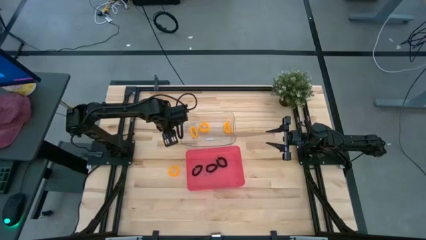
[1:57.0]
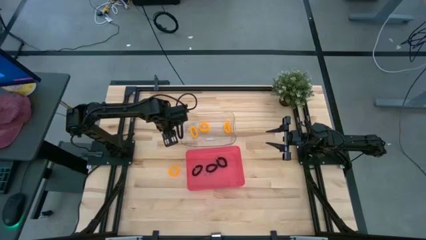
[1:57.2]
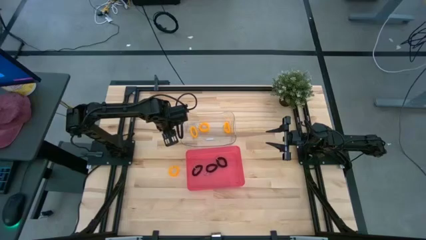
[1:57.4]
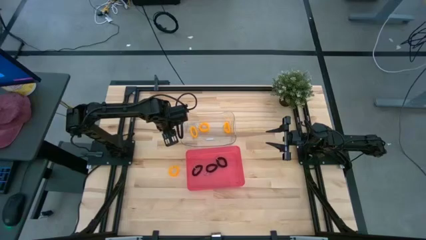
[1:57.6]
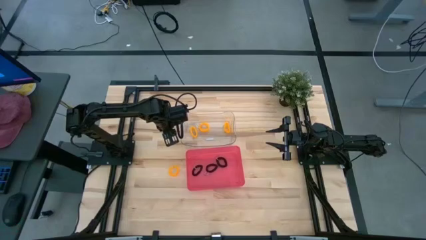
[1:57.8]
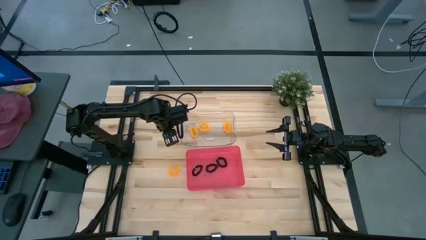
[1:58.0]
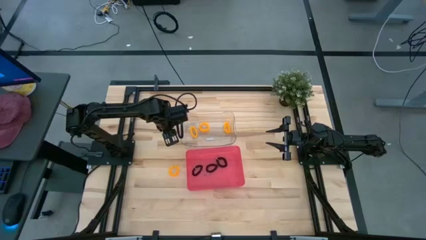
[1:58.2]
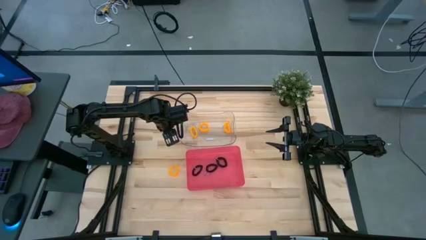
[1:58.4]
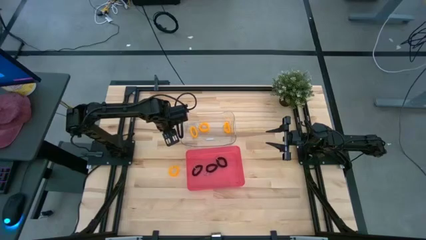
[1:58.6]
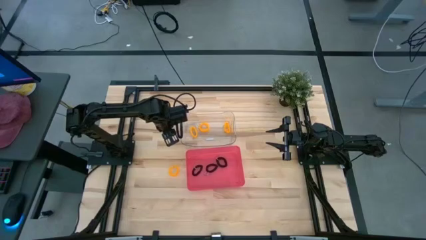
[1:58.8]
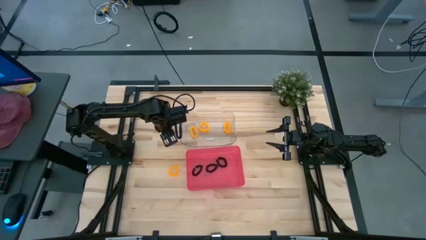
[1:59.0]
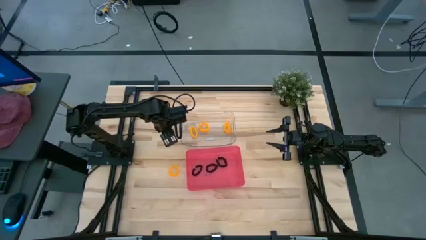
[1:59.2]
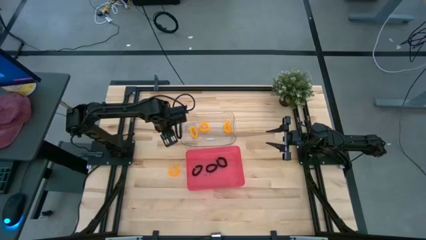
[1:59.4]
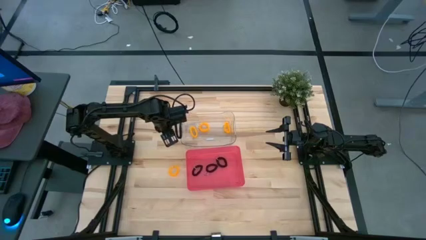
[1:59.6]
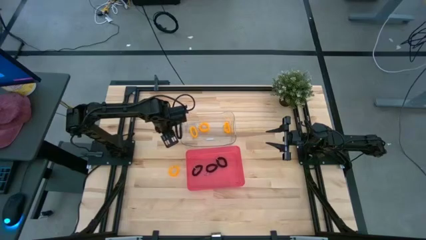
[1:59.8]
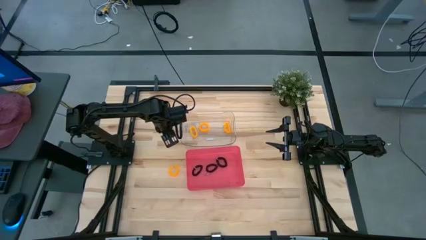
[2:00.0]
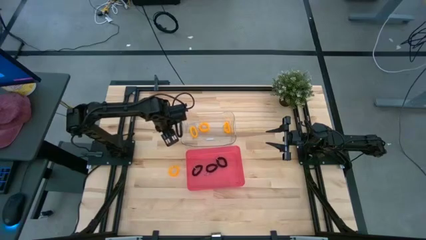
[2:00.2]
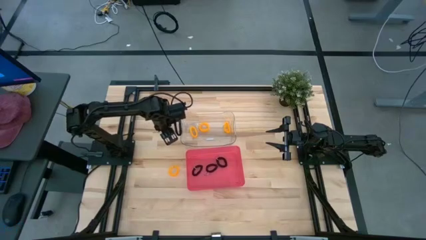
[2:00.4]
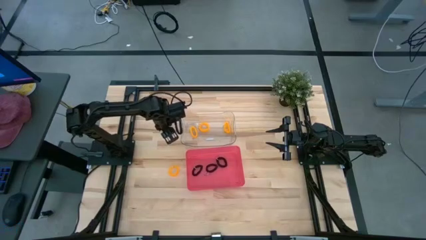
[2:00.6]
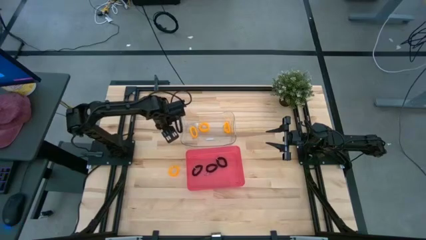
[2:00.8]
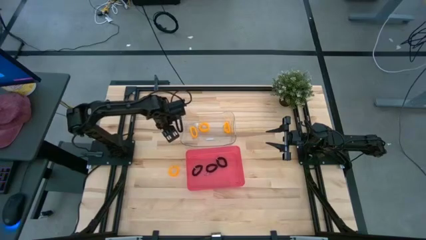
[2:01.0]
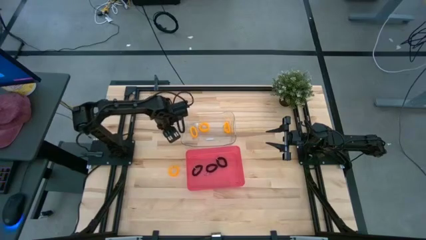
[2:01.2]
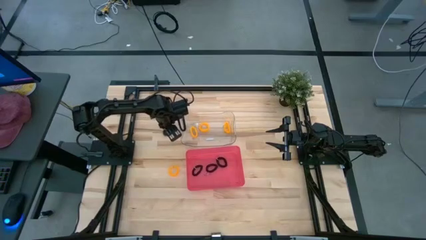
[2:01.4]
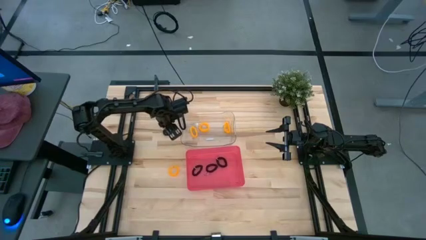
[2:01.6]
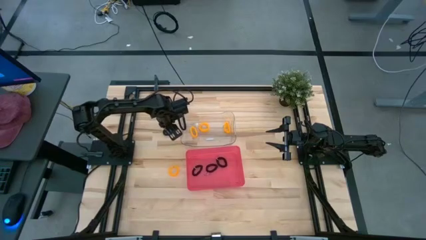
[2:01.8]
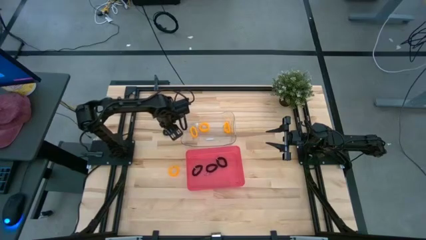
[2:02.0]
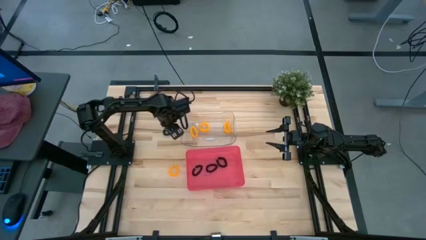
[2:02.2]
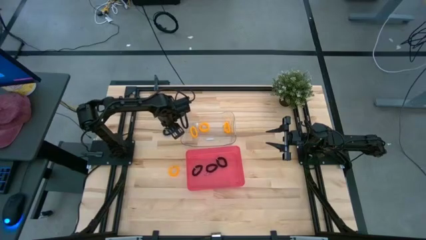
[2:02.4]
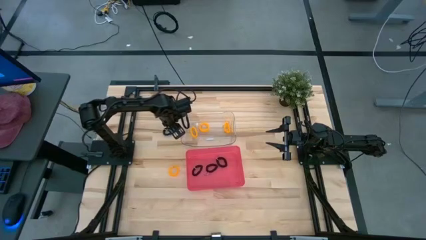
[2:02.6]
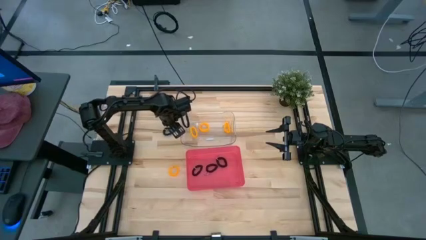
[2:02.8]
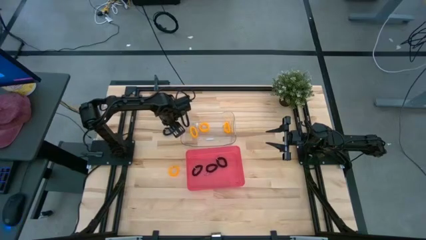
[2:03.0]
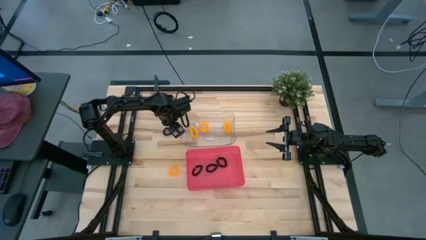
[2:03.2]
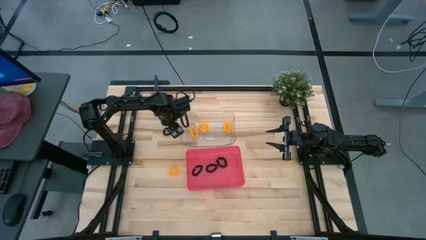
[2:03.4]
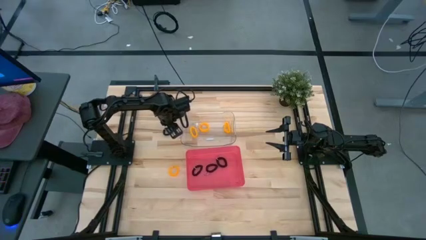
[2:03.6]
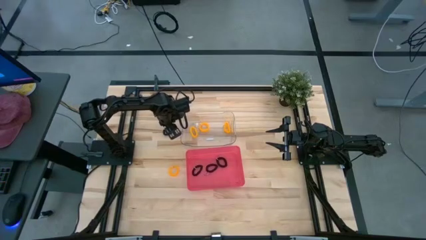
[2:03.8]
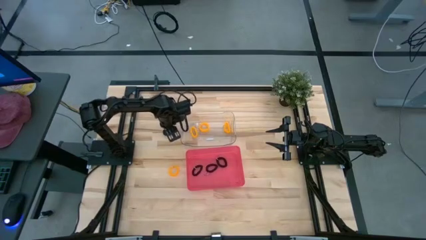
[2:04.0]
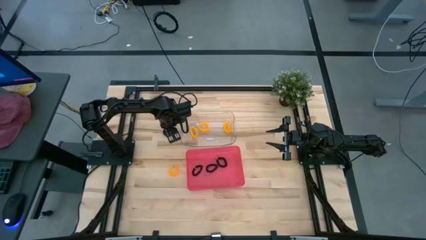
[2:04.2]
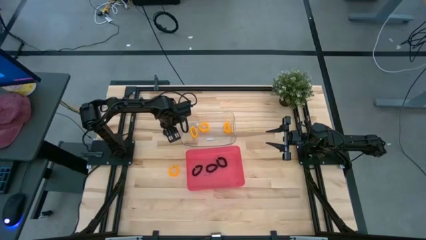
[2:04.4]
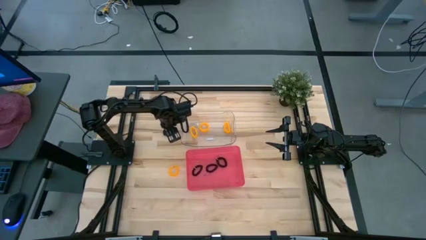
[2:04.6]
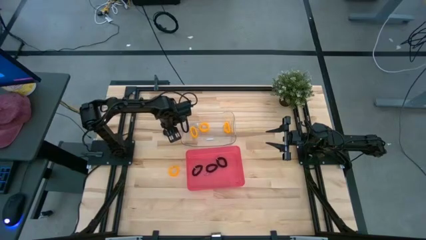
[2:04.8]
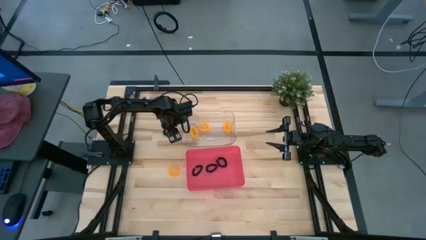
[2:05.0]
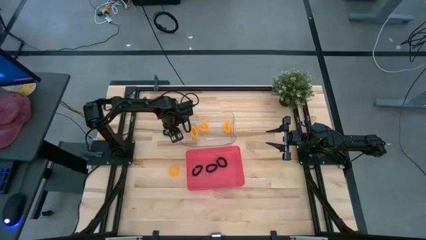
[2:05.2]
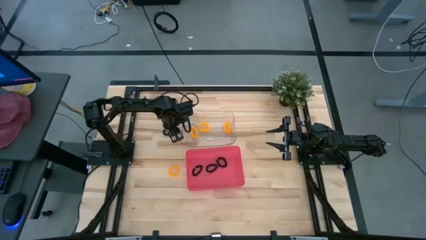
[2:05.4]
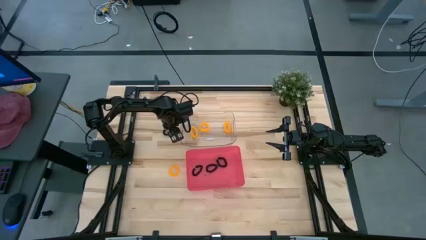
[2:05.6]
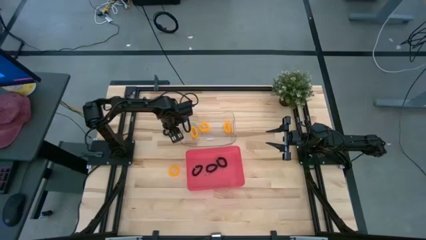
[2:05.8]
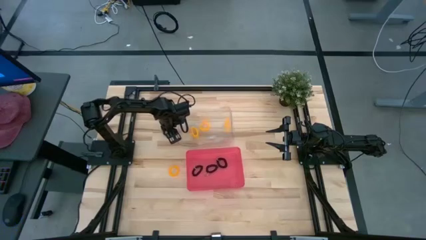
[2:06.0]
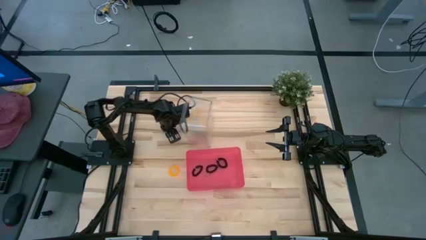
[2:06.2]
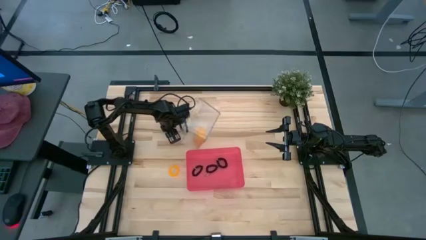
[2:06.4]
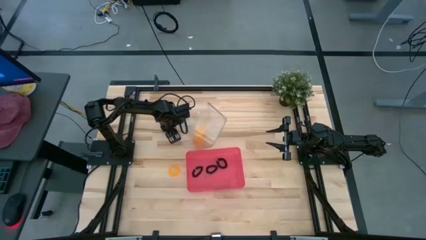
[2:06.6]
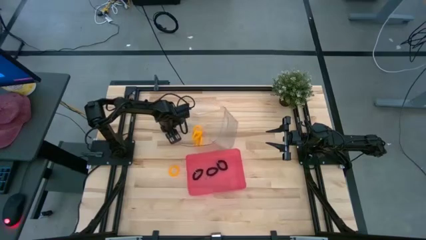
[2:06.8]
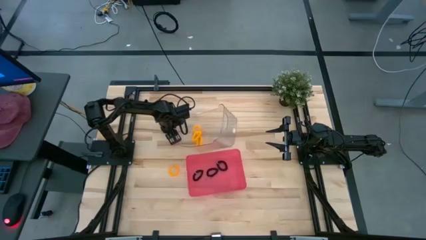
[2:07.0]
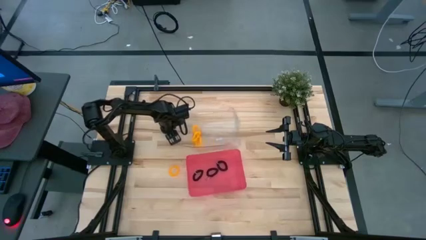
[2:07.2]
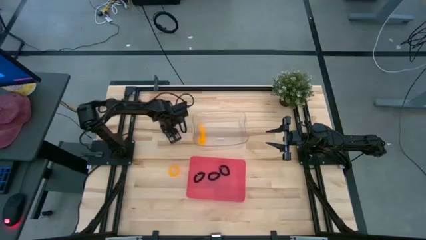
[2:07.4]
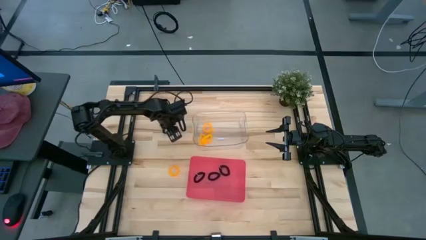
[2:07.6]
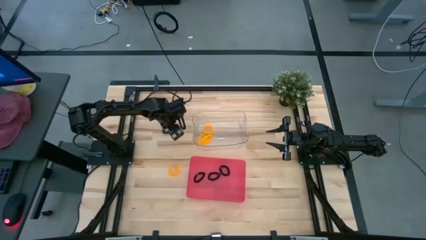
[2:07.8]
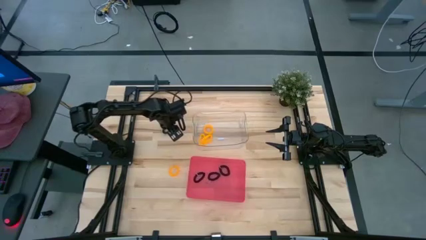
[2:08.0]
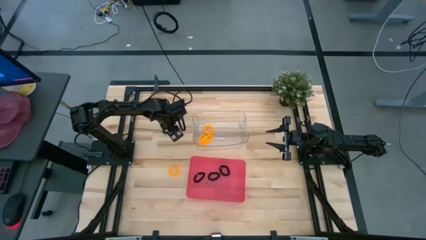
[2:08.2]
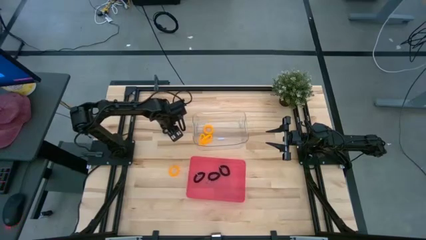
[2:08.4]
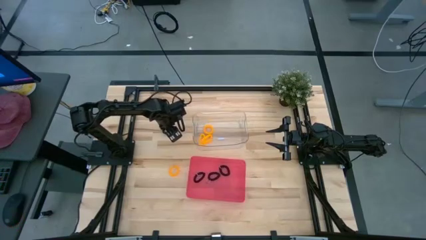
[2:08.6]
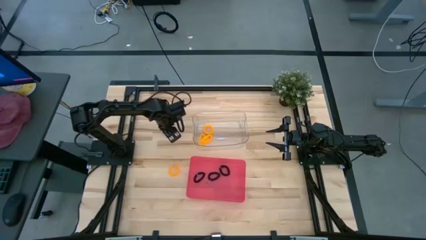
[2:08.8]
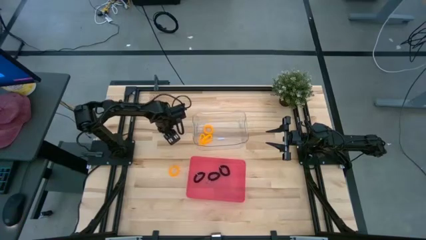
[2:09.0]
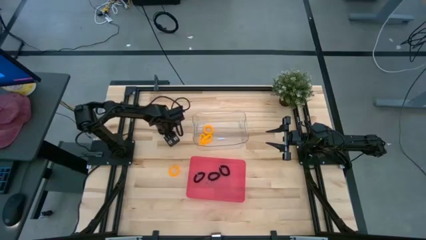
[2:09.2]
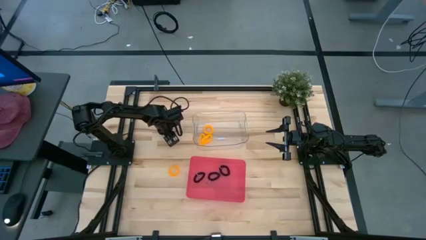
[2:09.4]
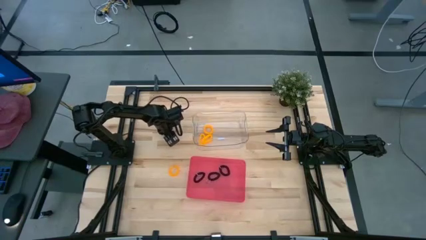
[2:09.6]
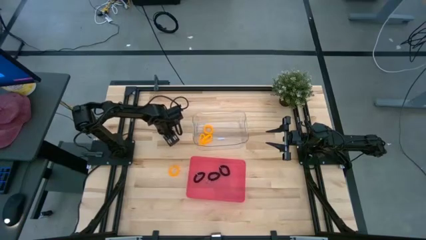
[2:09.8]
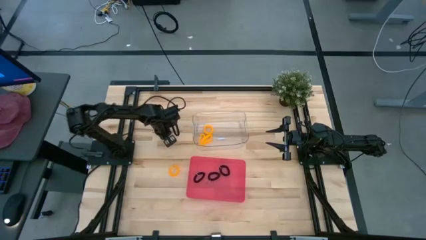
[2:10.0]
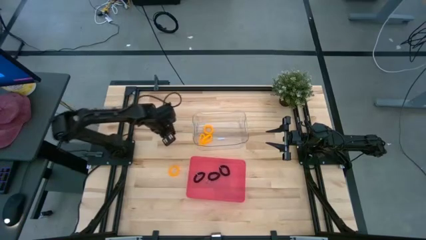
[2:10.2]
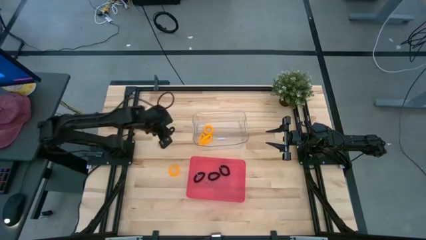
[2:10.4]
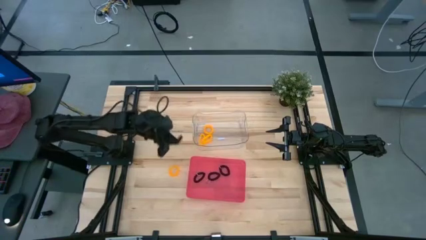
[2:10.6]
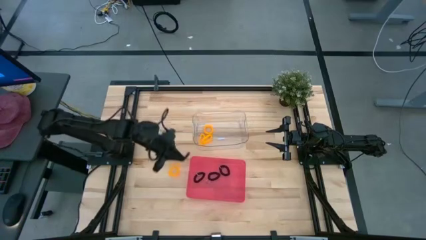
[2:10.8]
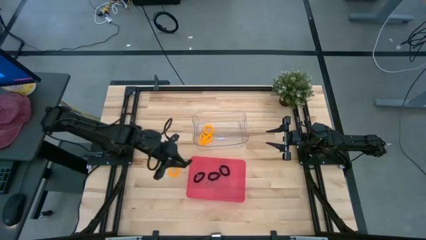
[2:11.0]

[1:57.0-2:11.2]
Task: Sort spring keychains
Put the black spring keychain into the red bin

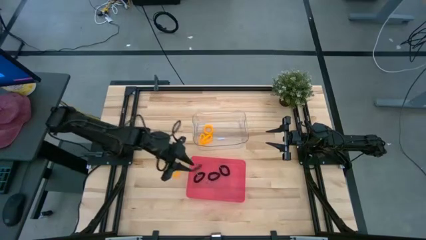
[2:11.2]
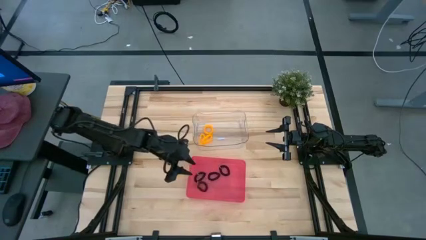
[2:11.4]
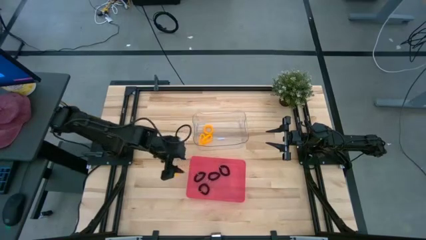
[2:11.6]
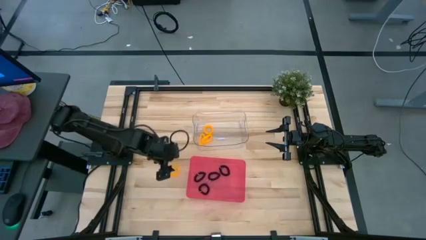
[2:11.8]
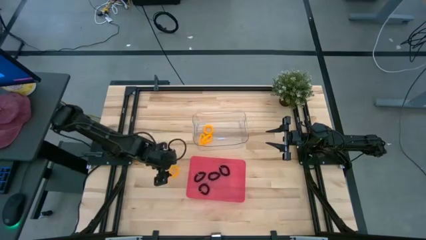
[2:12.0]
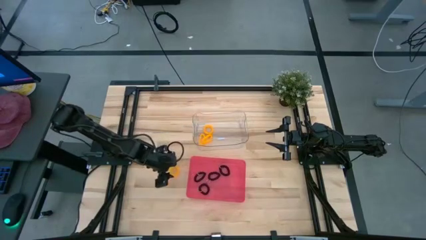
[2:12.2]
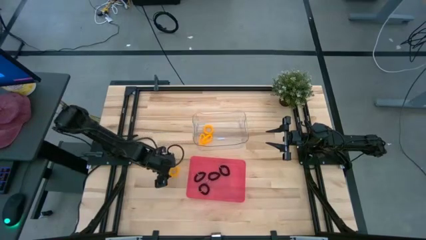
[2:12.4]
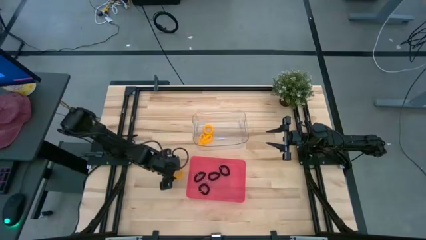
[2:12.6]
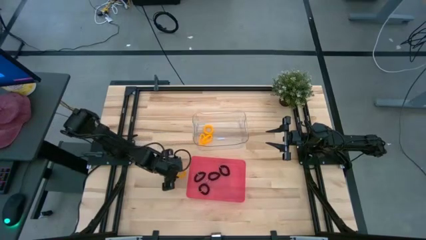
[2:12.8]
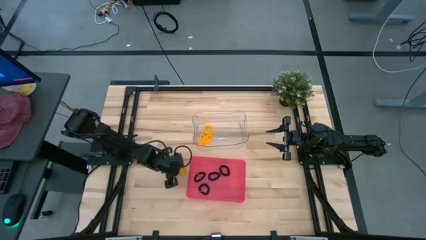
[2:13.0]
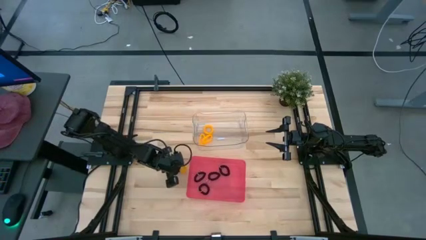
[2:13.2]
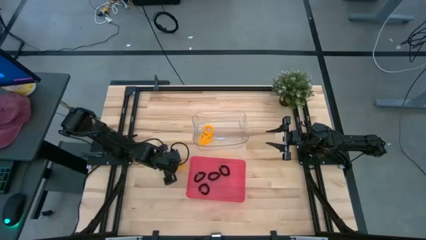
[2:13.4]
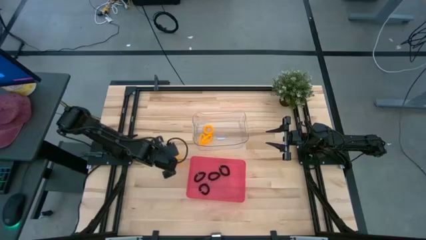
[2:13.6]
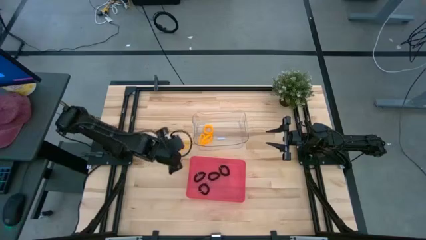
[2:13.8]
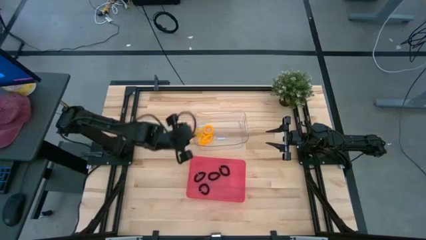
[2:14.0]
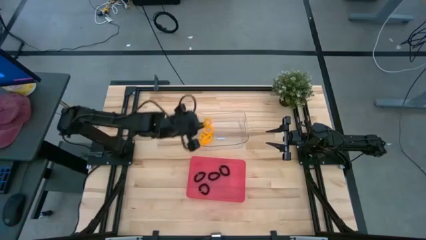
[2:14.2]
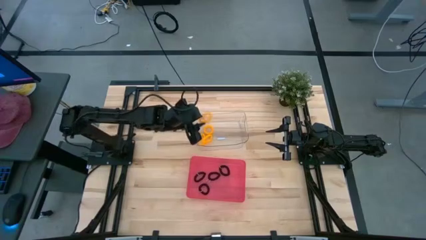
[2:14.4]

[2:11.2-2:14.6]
Put the yellow spring keychain into the transparent bin
